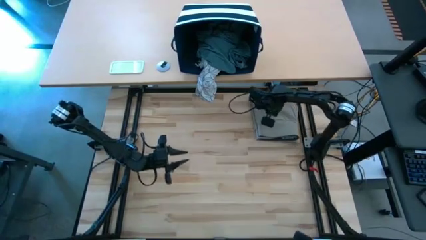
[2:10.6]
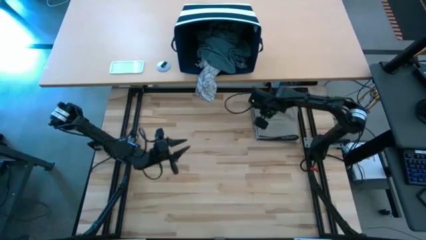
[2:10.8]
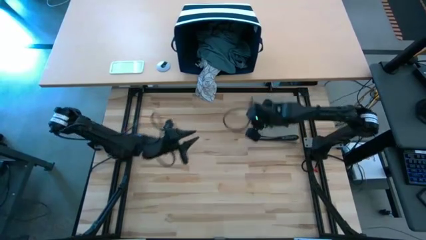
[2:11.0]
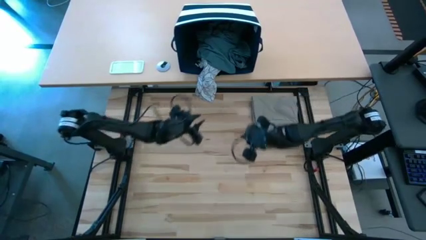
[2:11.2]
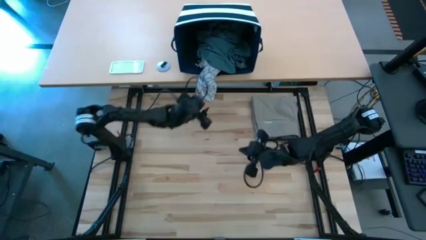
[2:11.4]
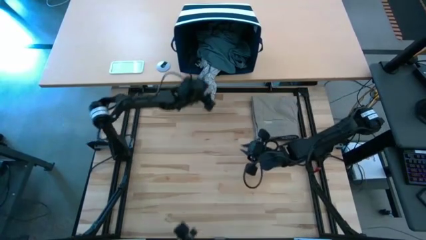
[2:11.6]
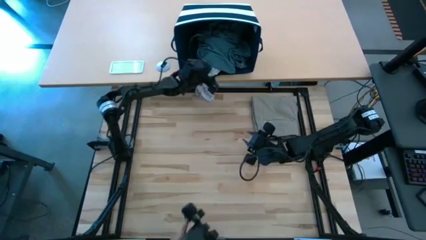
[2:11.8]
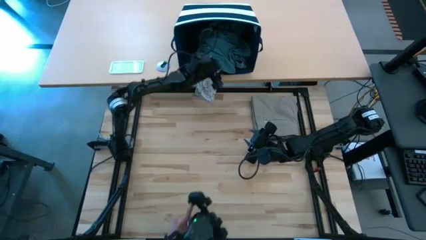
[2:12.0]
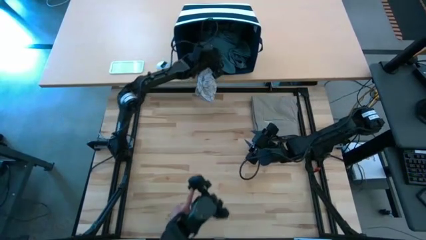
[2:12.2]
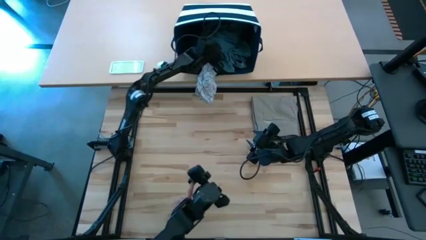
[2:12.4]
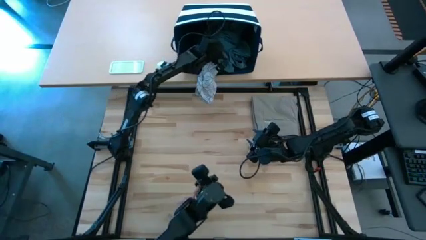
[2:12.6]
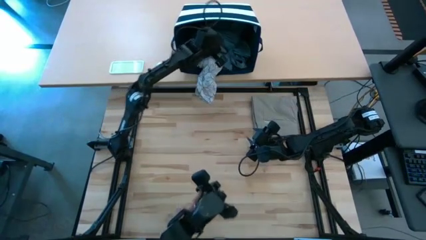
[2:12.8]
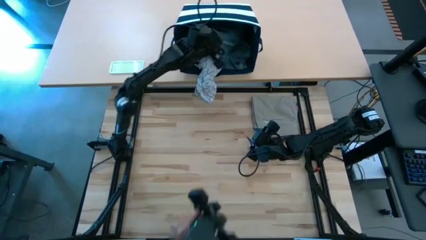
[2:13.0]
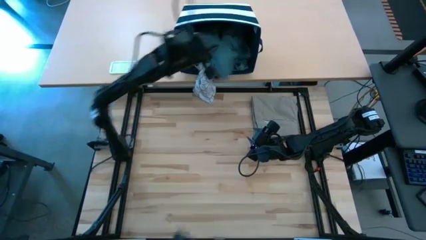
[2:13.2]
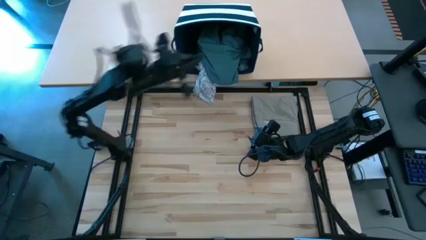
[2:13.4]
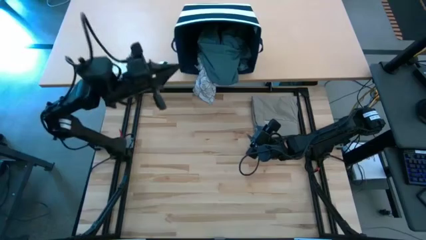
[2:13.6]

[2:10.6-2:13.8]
Task: Fold Laundry from Bin
Remove the clothes from the blue laundry basket

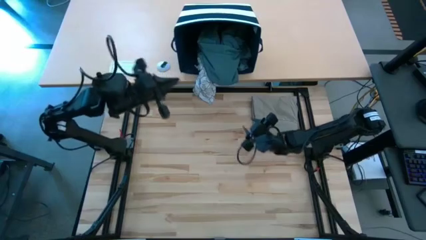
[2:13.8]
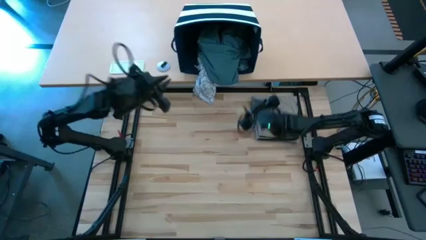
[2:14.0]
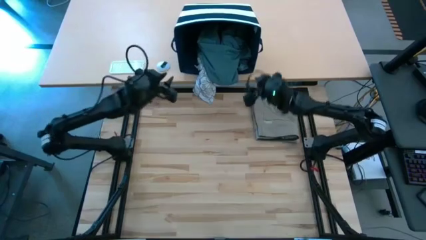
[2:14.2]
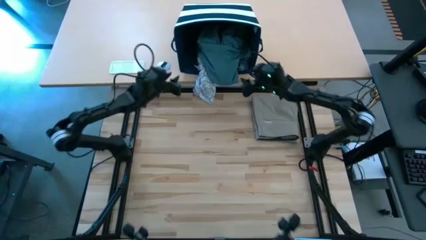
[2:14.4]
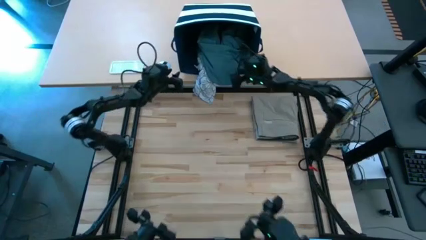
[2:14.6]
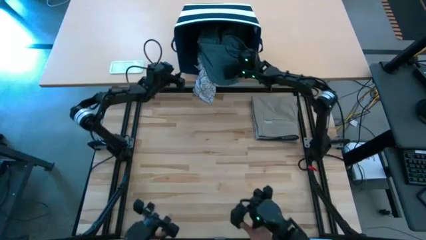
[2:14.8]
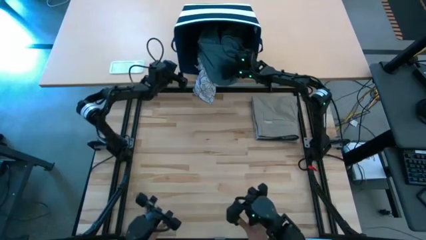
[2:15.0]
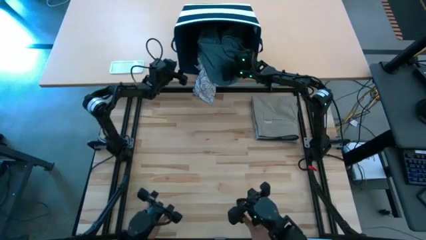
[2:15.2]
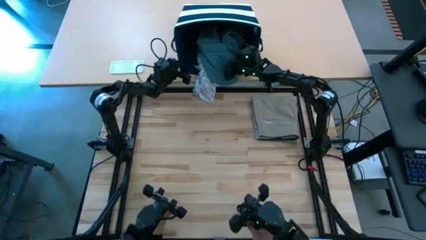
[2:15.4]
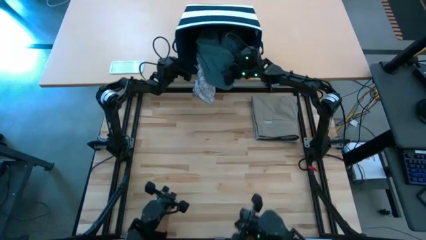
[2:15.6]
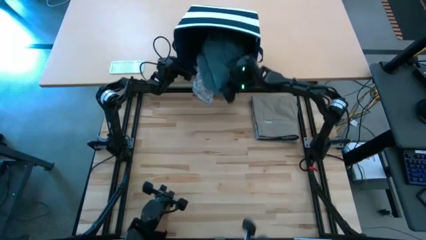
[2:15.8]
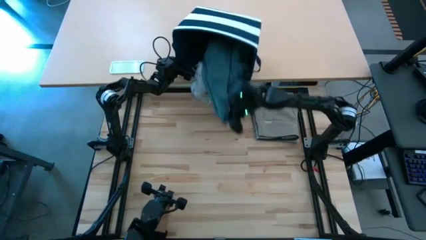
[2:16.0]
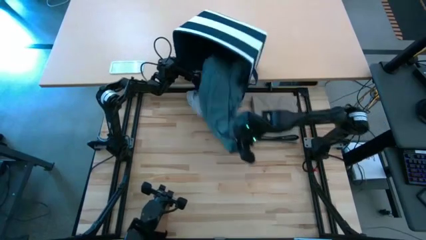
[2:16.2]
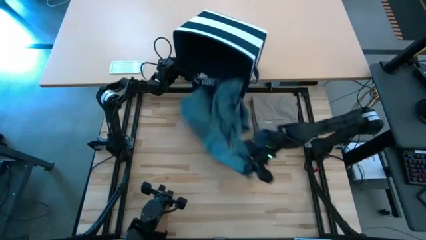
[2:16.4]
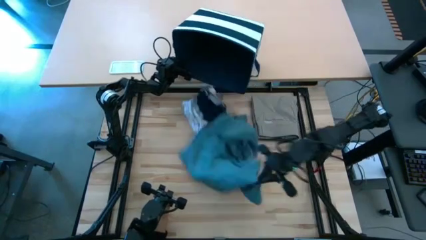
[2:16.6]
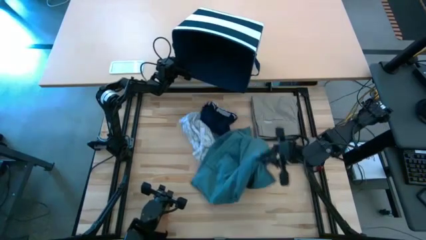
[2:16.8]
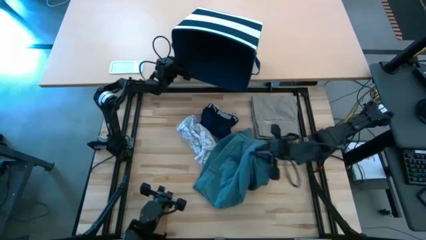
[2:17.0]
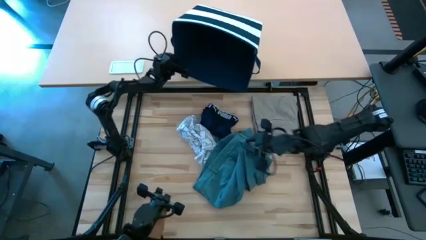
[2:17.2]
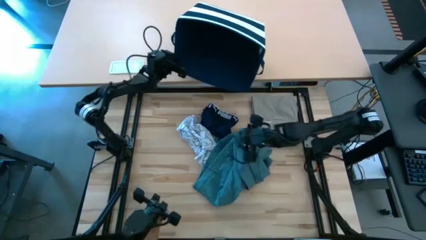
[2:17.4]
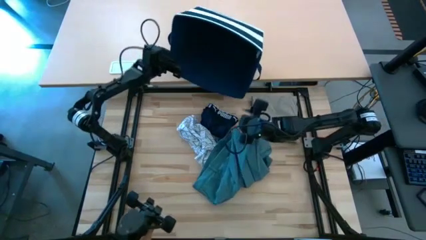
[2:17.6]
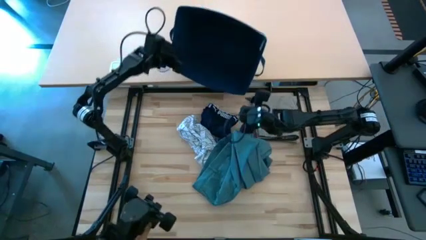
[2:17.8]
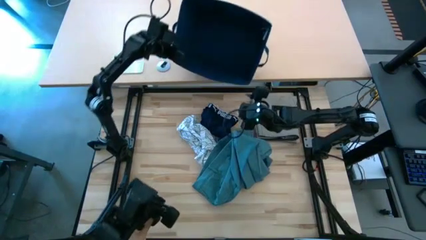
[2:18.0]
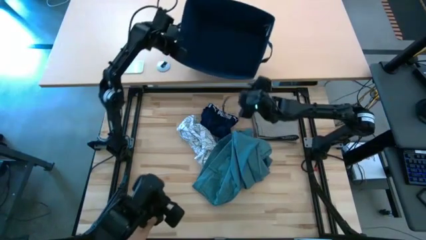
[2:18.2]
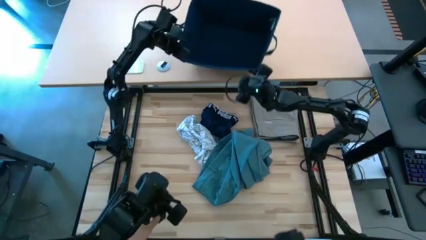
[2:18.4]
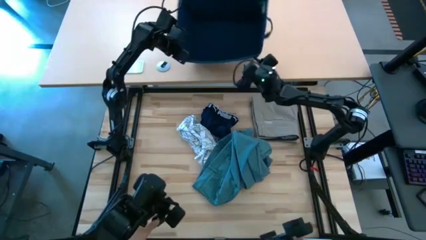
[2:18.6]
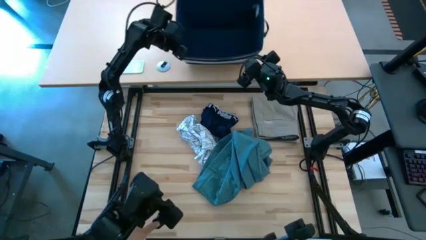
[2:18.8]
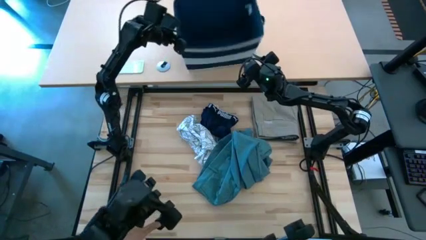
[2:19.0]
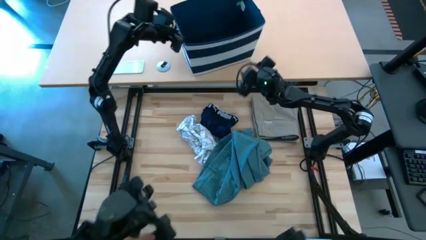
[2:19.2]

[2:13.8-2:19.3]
Remove the clothes from the blue laundry basket

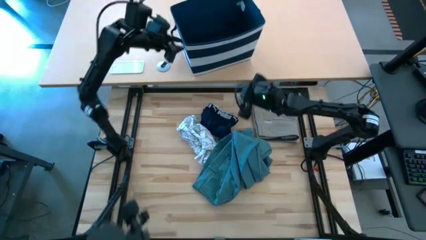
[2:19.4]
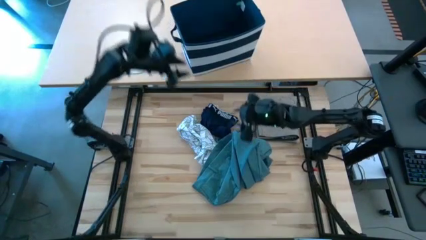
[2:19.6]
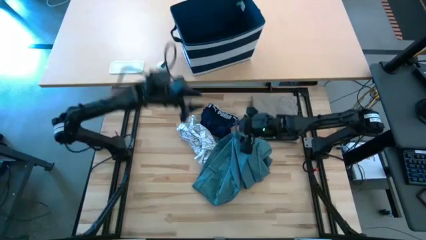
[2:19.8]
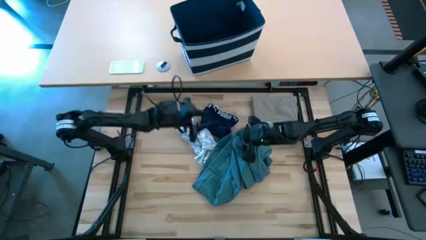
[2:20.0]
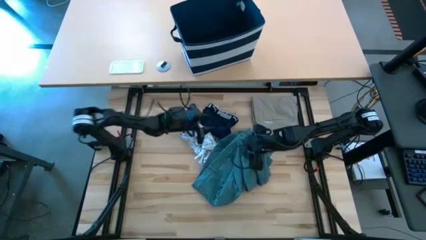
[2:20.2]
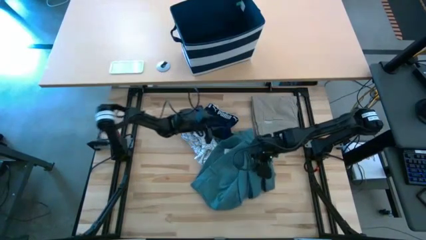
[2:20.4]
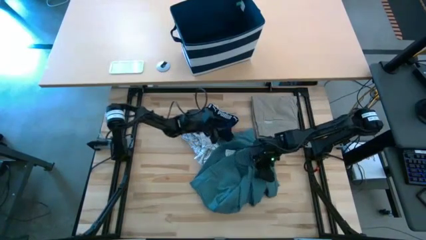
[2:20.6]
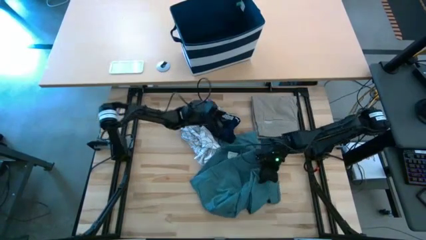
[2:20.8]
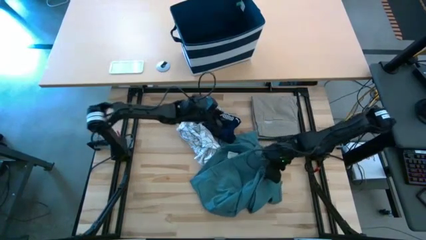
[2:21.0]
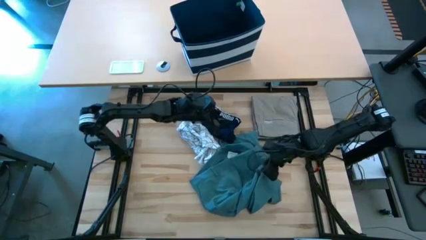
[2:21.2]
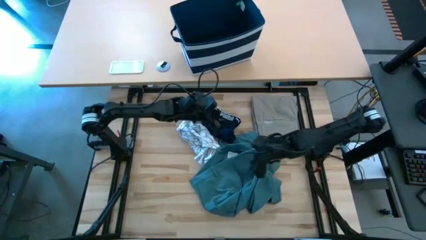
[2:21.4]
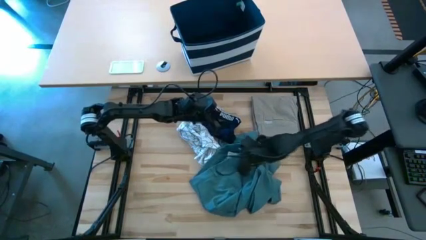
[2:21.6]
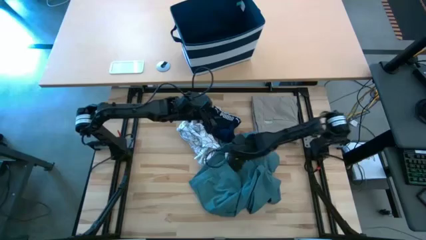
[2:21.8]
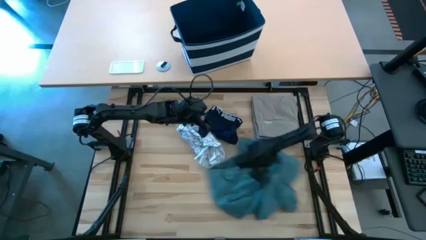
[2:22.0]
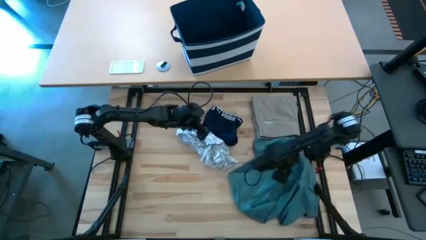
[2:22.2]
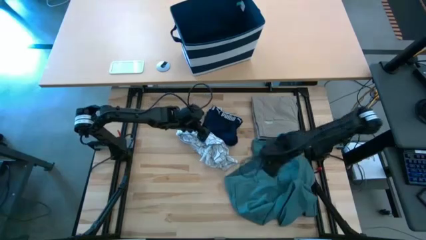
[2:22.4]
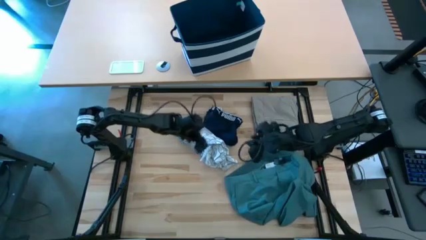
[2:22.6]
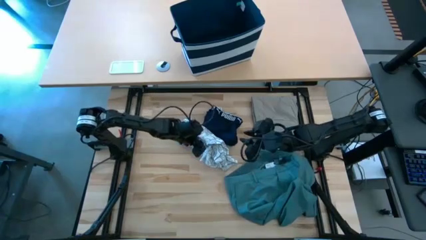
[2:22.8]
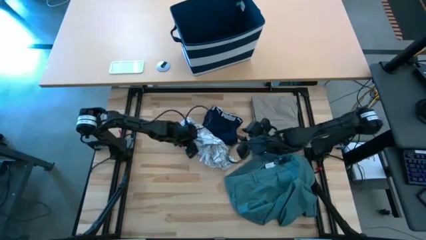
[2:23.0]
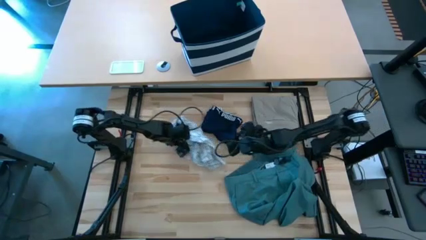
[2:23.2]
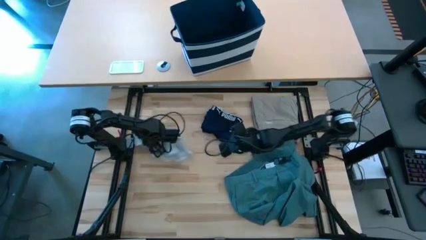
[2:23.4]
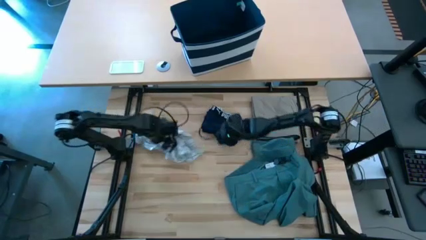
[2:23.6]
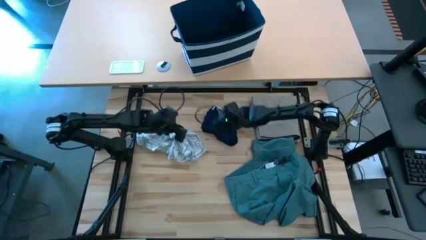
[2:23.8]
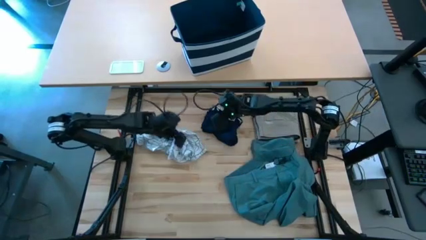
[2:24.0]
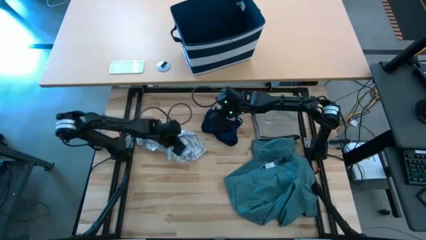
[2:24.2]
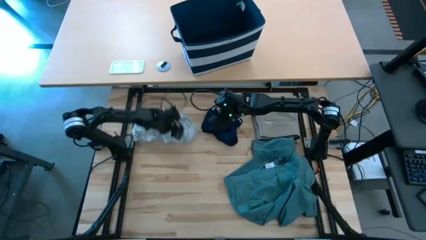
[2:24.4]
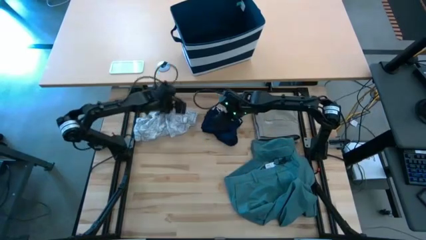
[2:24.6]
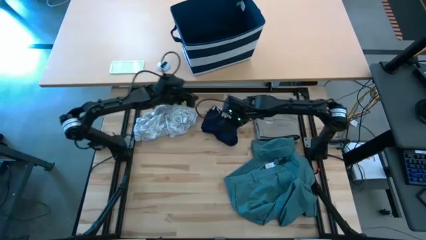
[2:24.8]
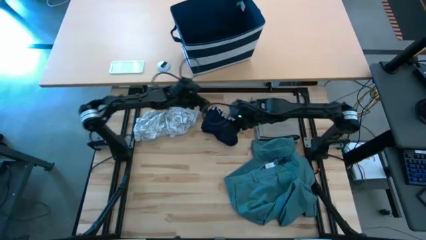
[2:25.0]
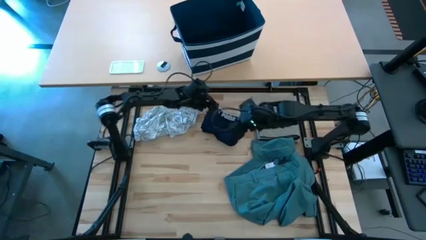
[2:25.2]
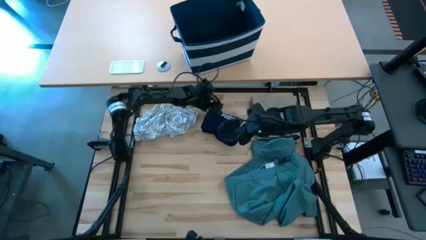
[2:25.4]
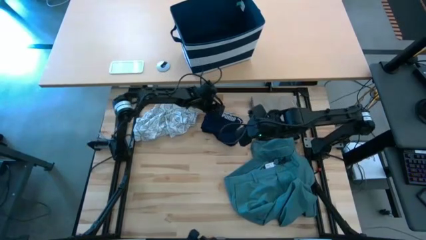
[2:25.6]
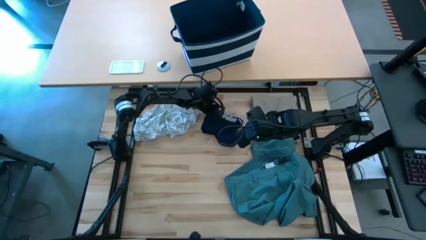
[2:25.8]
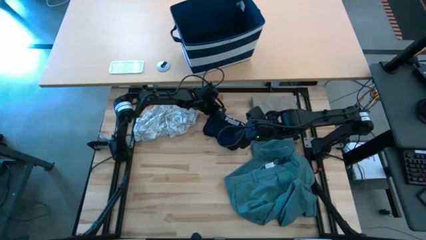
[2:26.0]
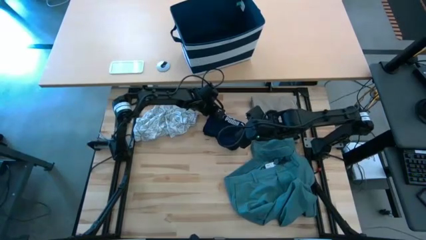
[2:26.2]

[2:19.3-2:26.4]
Fold the blue boxer
